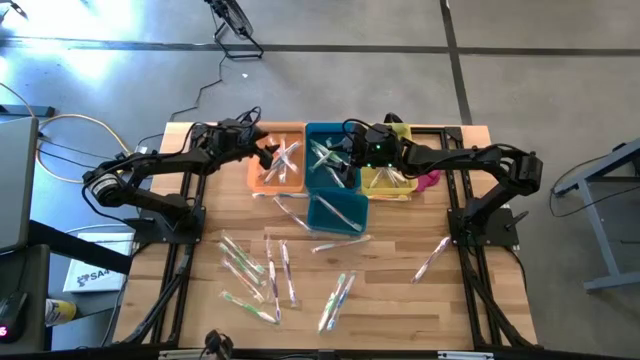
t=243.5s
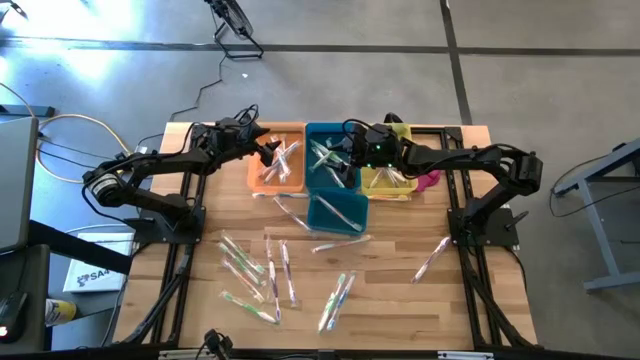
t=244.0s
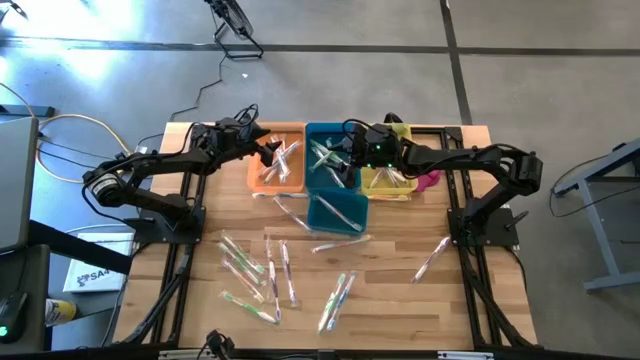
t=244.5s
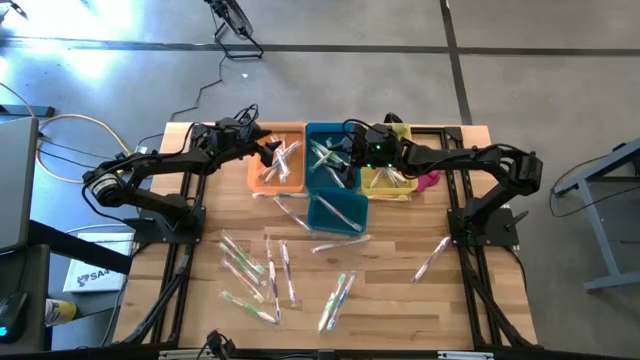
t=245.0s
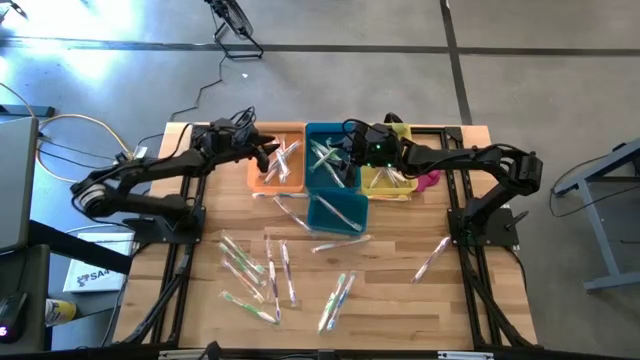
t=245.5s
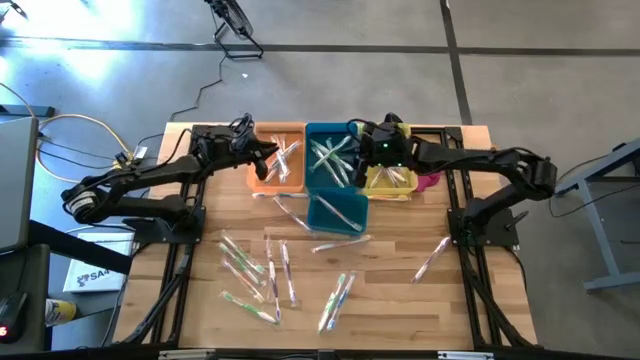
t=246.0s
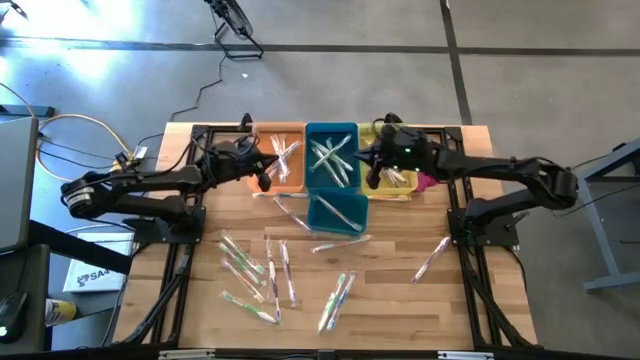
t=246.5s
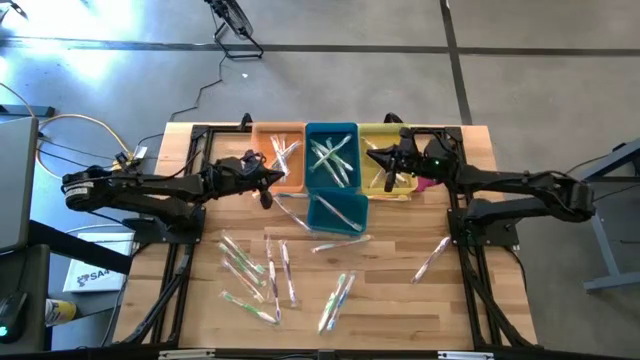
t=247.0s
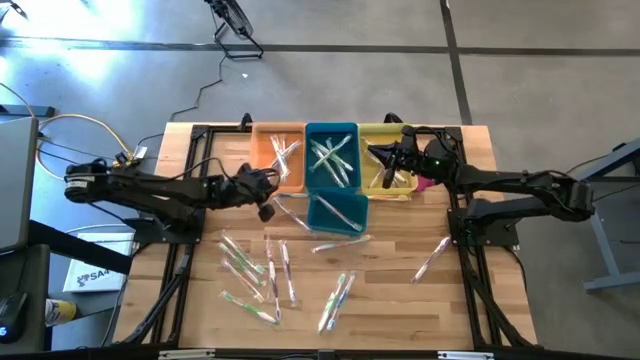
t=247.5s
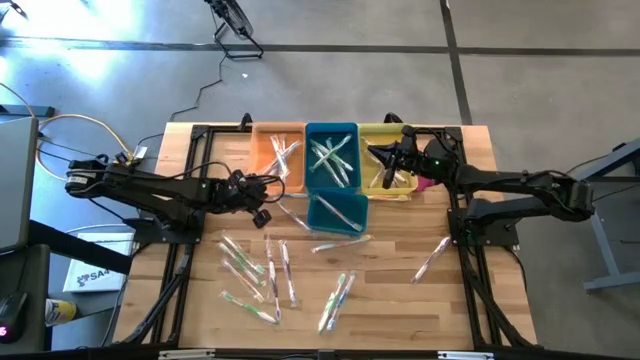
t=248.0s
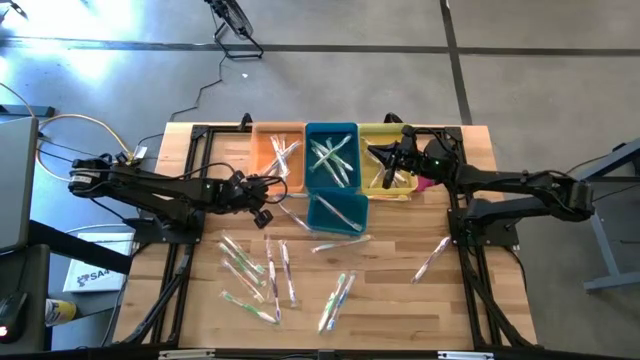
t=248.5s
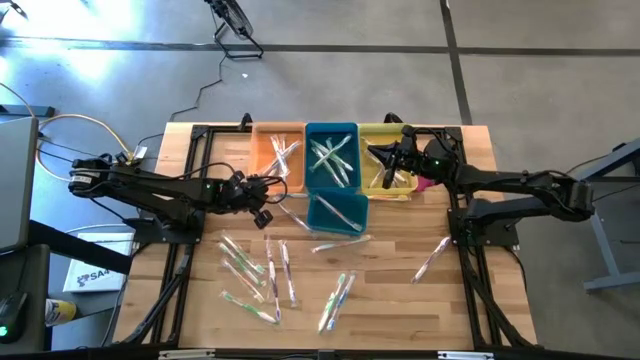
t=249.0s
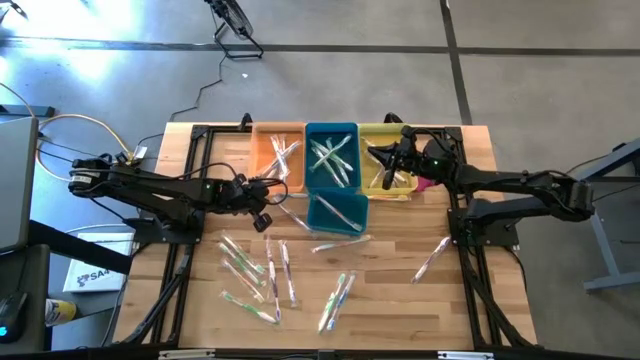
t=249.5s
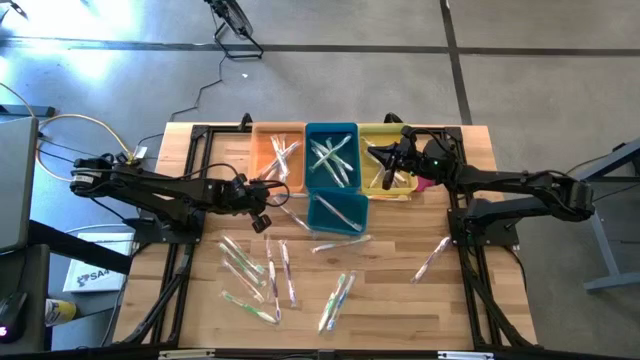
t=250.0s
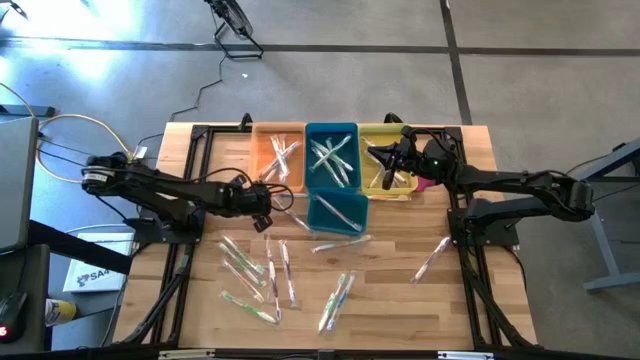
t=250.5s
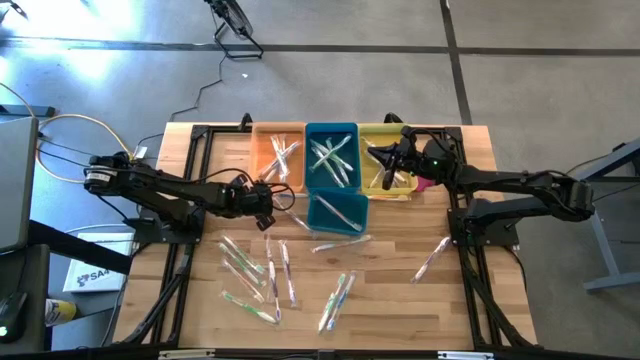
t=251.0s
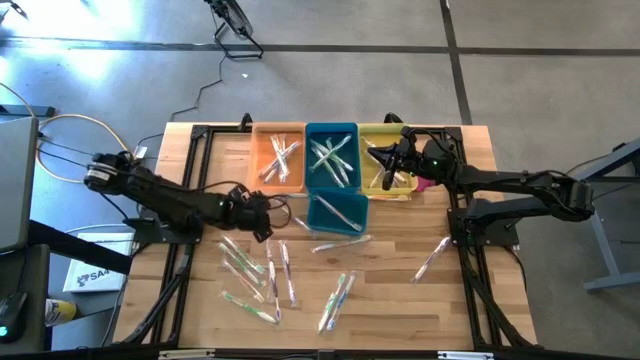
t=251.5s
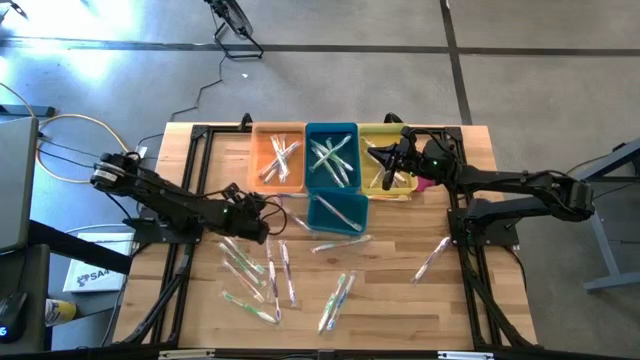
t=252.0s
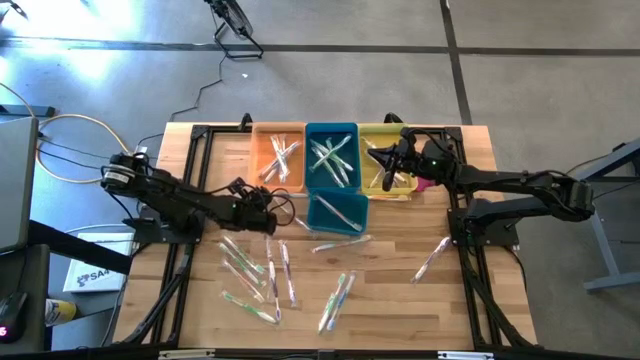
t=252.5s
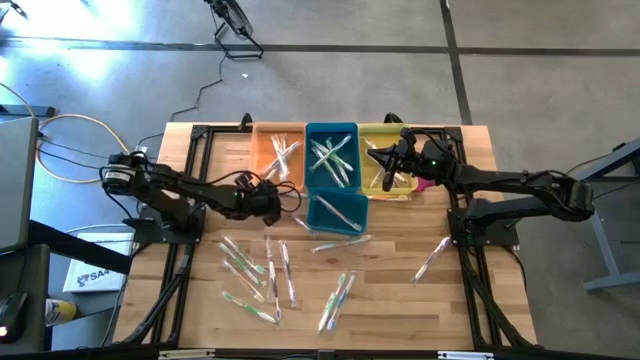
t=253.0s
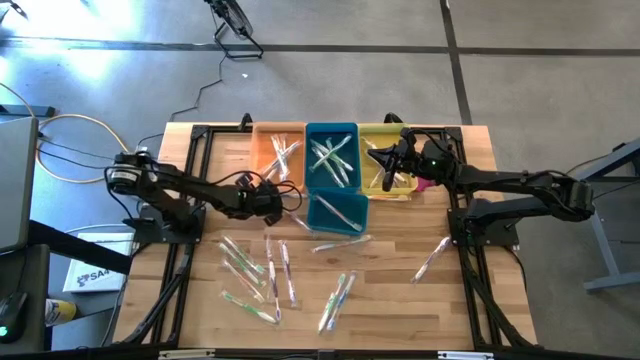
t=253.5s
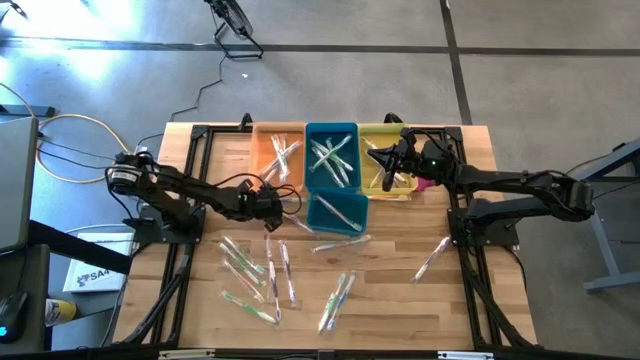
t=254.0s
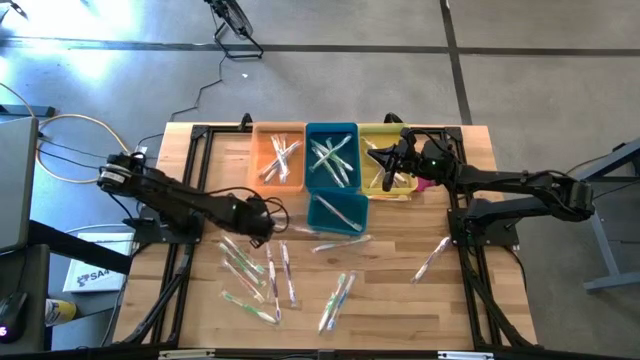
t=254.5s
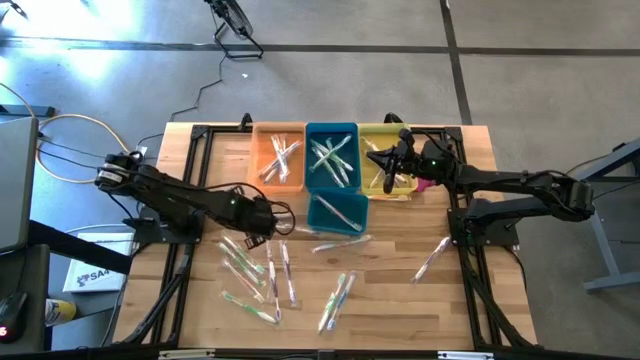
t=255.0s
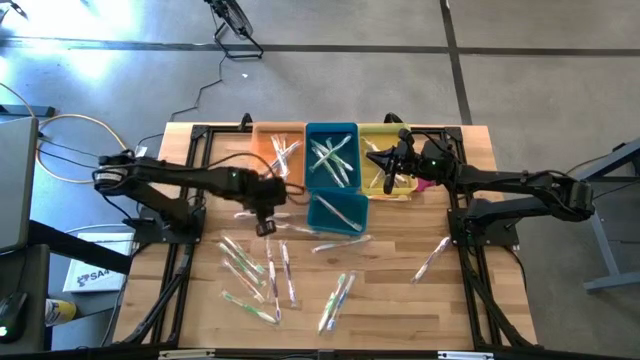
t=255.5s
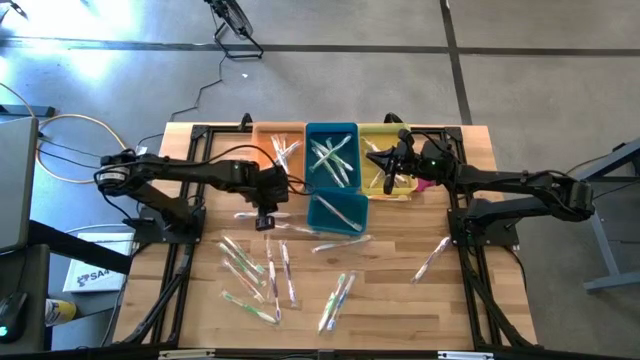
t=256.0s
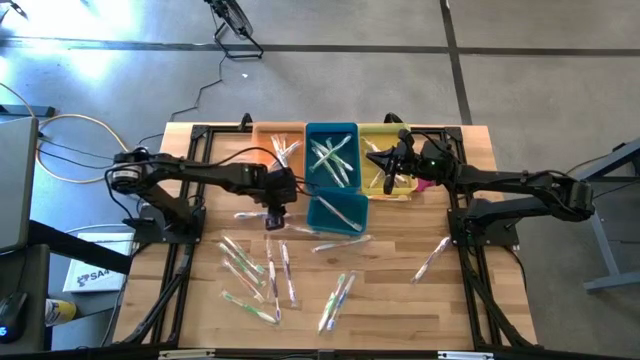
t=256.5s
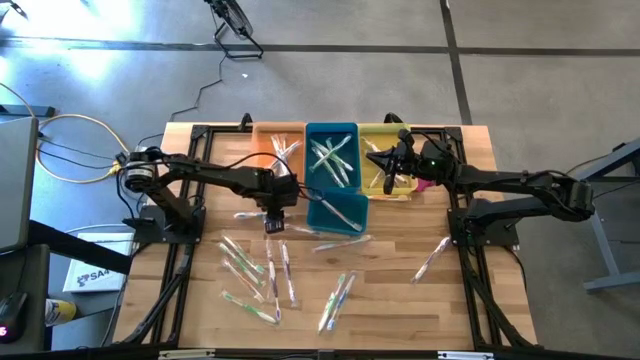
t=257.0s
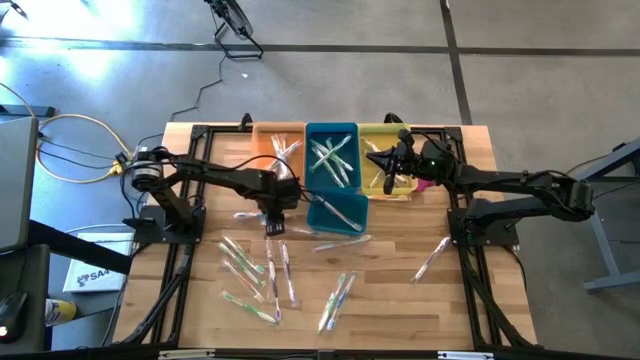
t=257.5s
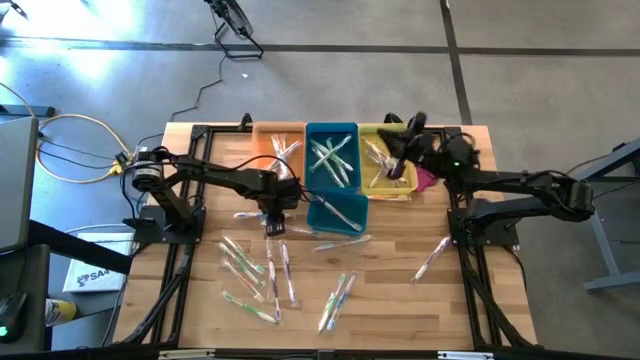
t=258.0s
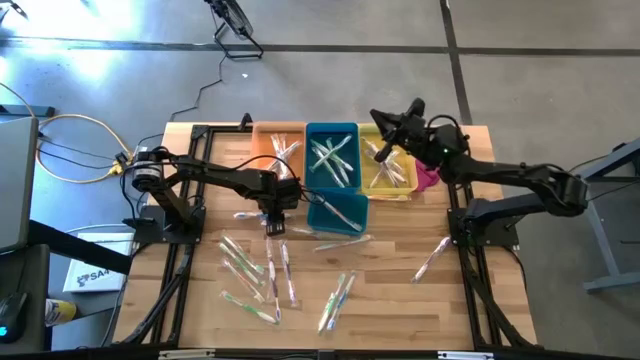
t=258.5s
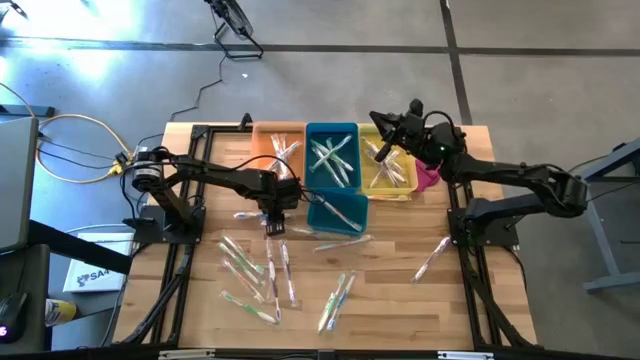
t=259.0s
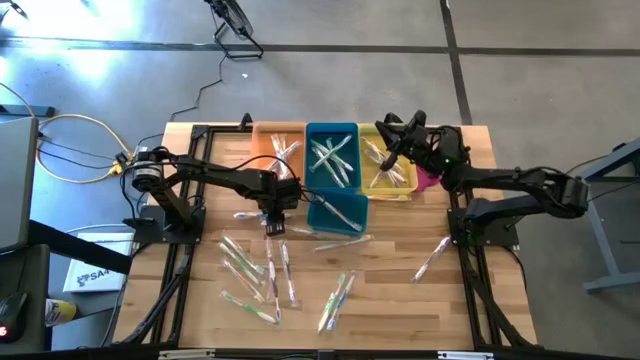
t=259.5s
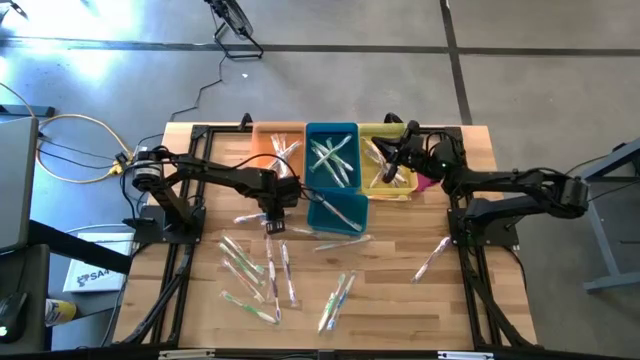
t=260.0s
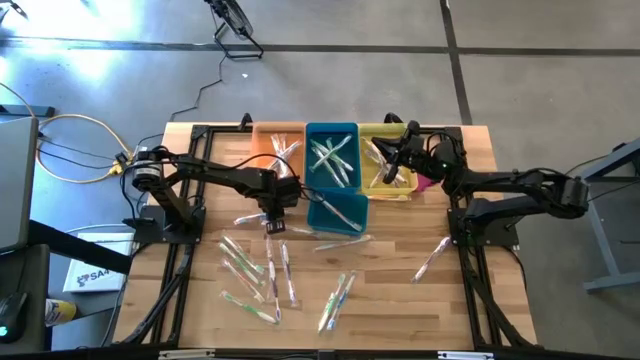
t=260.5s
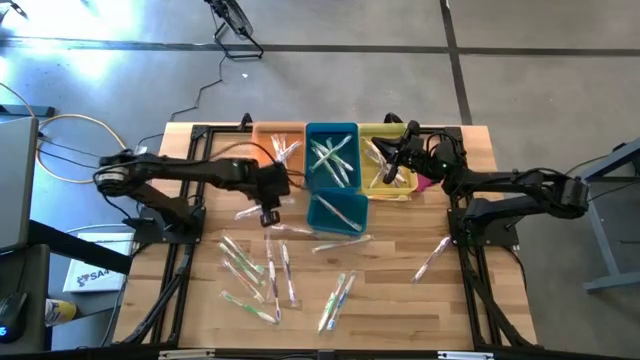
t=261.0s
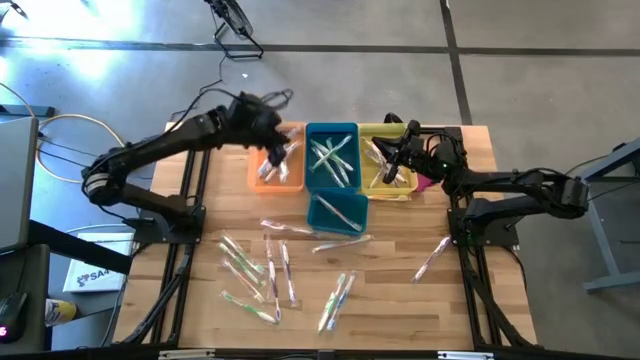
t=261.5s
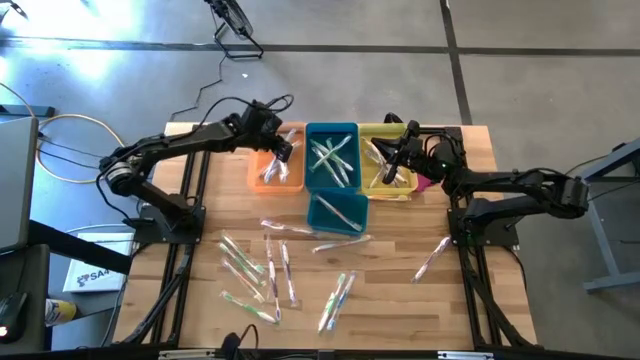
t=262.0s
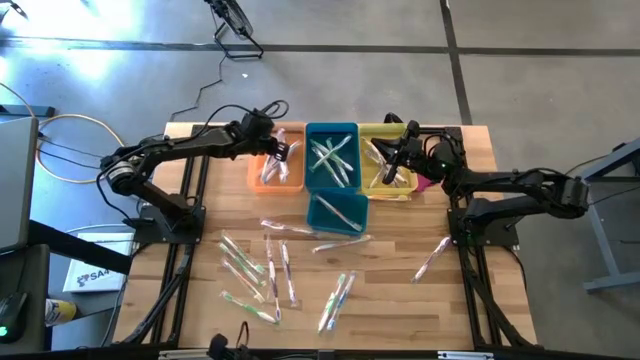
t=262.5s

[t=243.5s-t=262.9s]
Task: Pick & Place Toothbrushes
Put the blue toothbrush into the orange bin

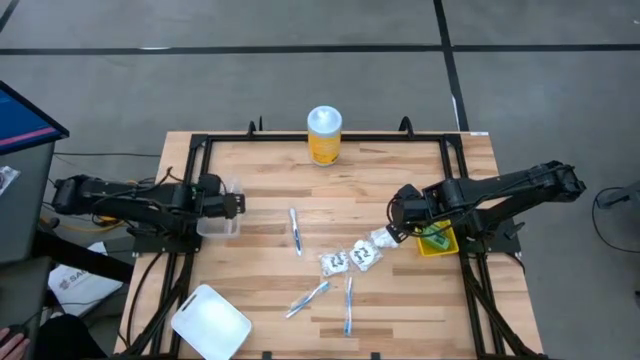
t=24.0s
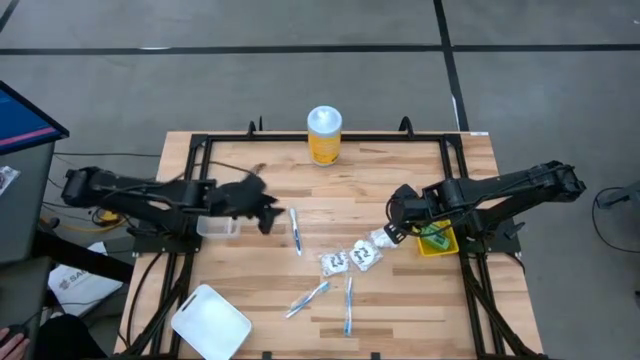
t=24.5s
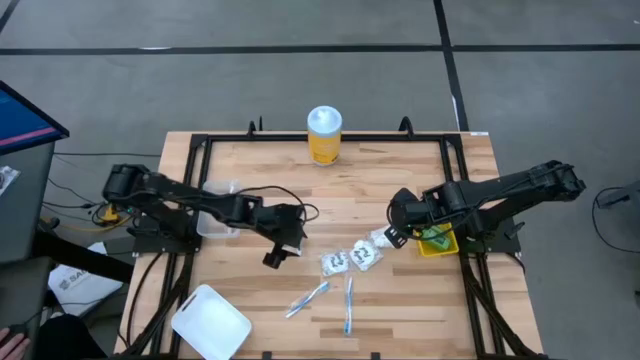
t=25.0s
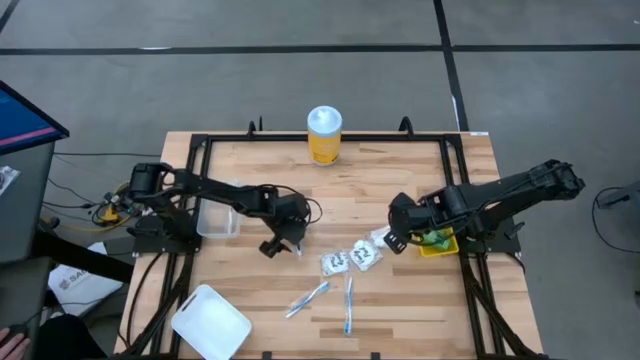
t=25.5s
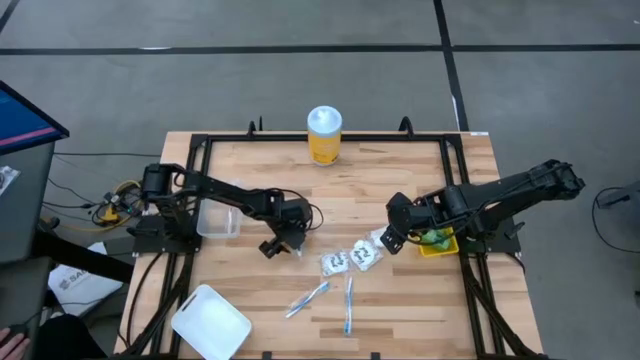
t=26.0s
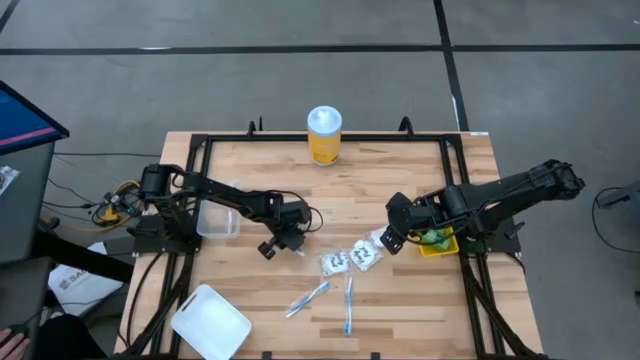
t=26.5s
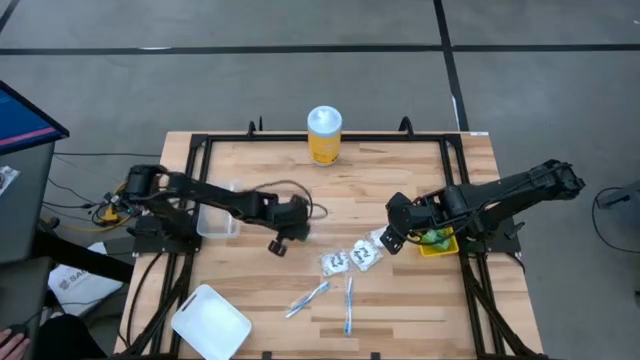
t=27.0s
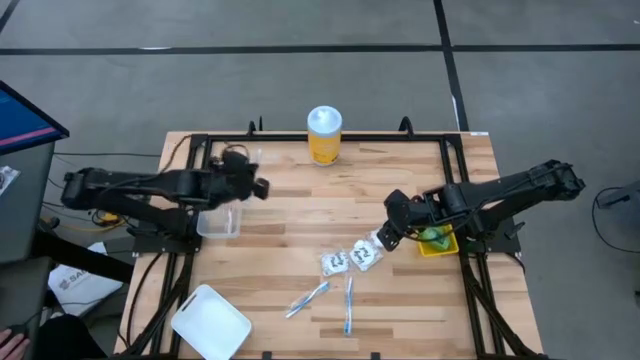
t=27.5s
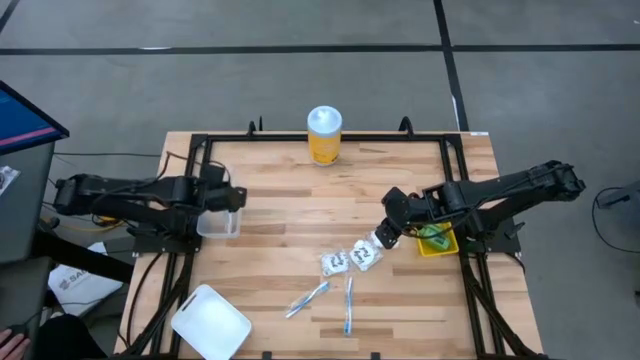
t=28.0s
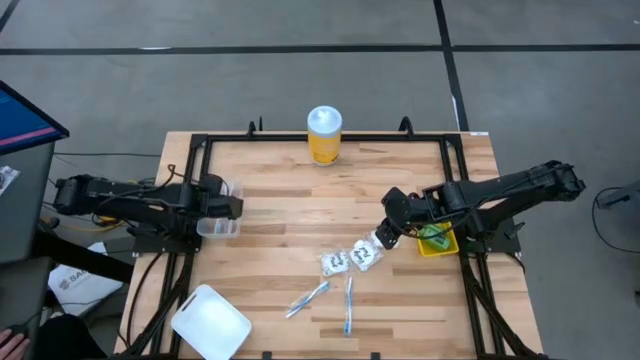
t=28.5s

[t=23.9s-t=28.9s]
Task: Pick & Place Travel size toiletries
Put the dark blue toothbrush into the transparent bin
